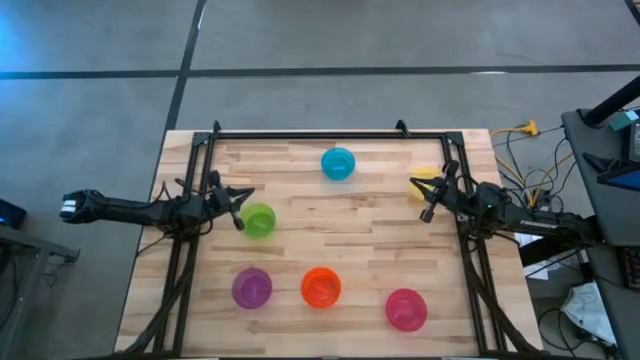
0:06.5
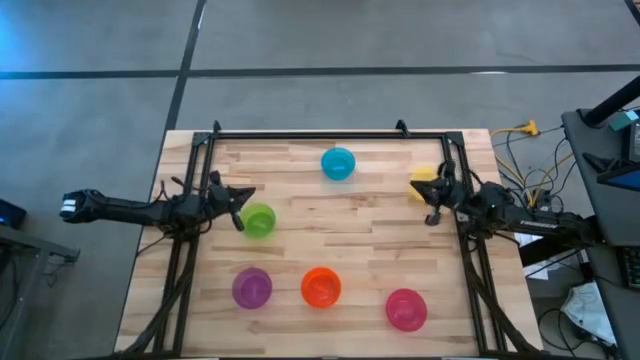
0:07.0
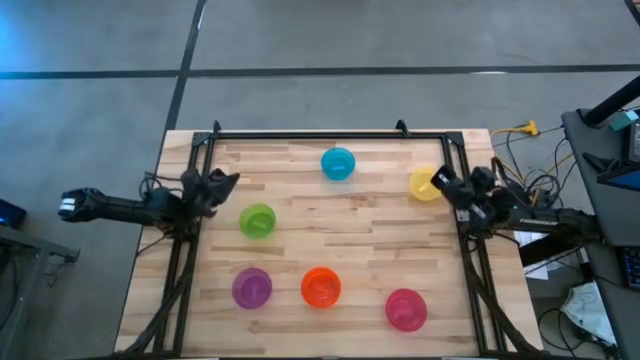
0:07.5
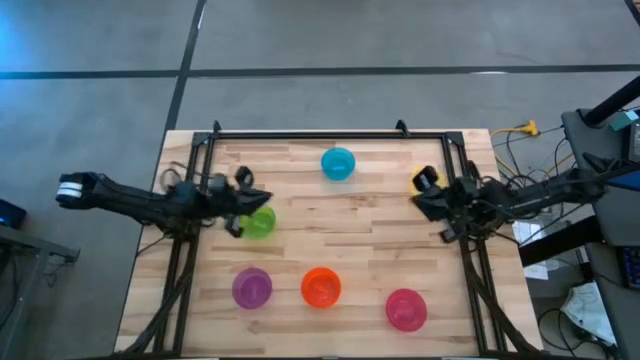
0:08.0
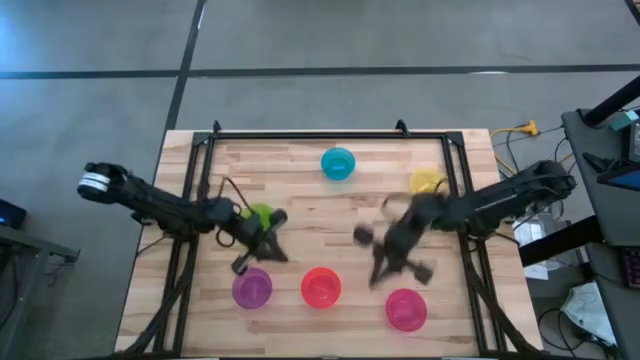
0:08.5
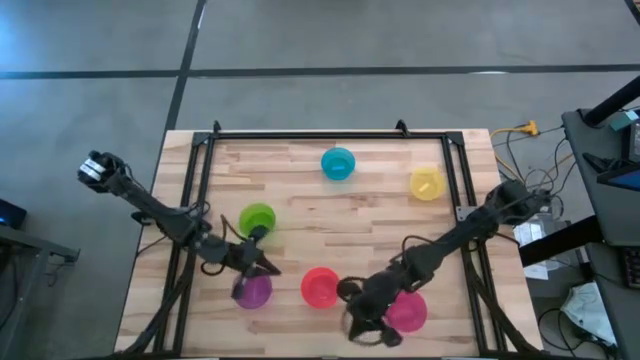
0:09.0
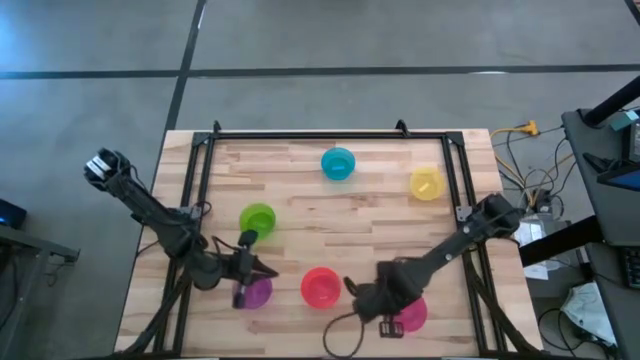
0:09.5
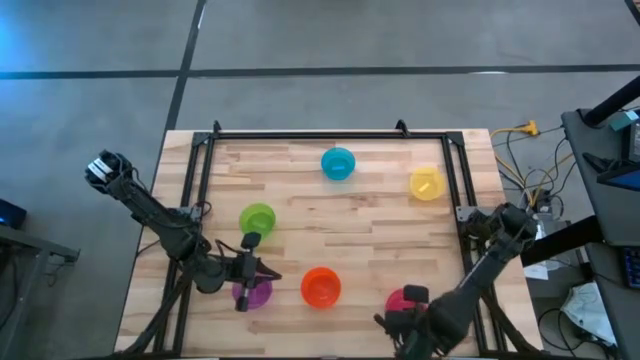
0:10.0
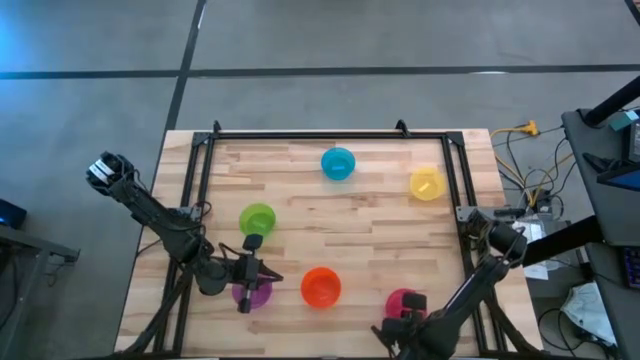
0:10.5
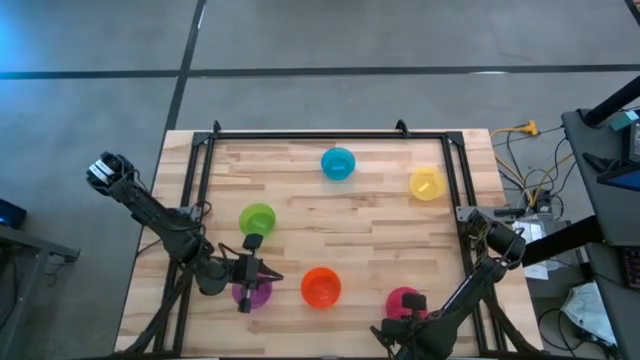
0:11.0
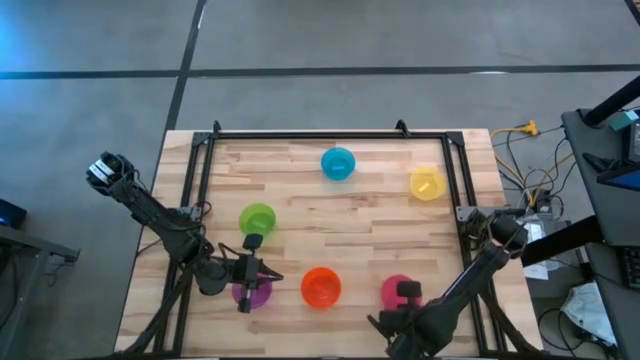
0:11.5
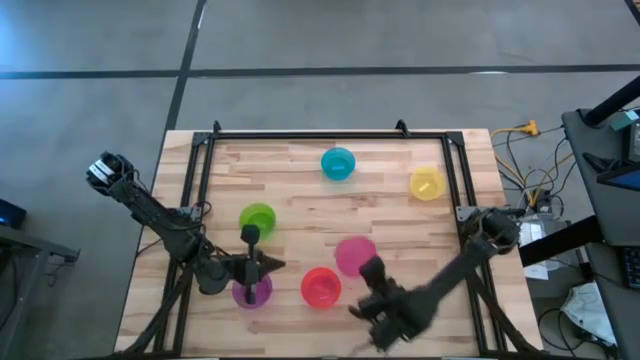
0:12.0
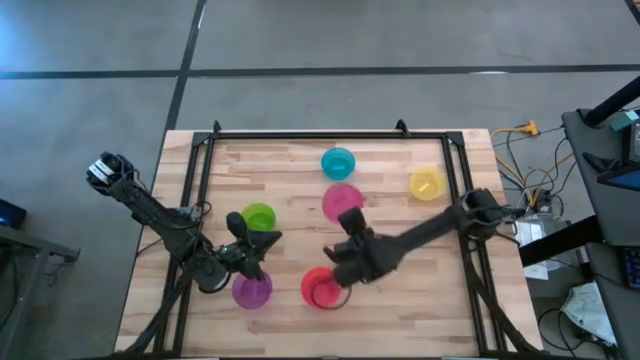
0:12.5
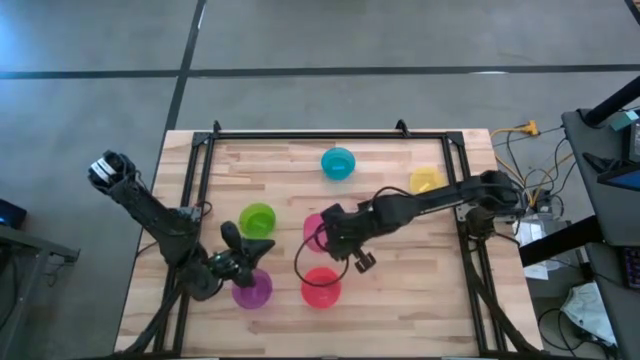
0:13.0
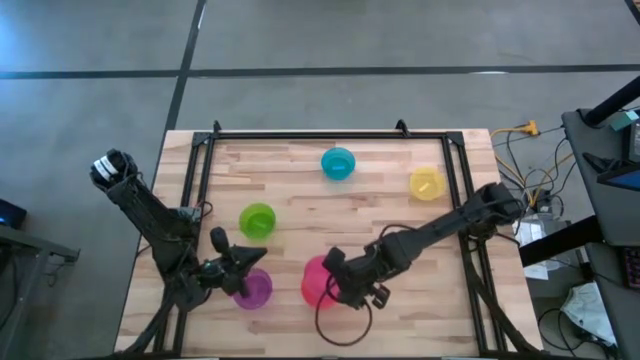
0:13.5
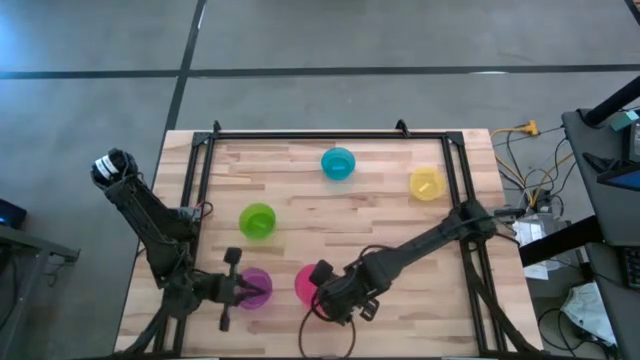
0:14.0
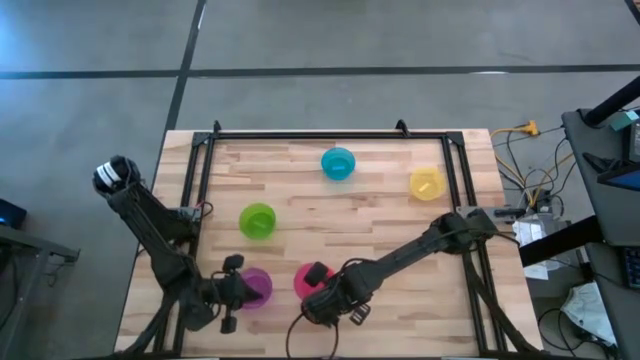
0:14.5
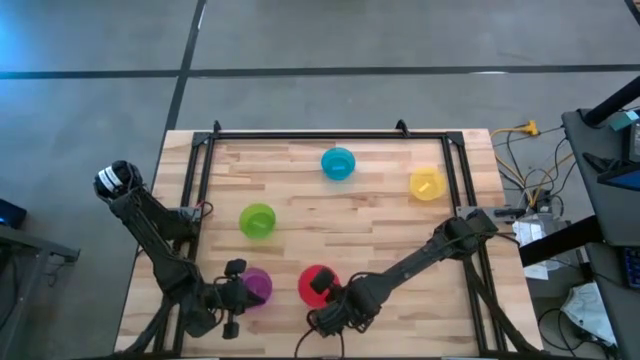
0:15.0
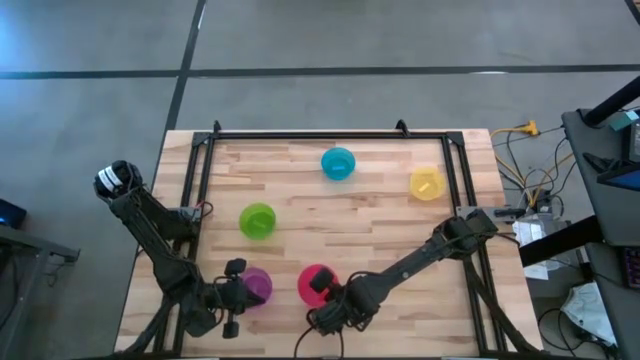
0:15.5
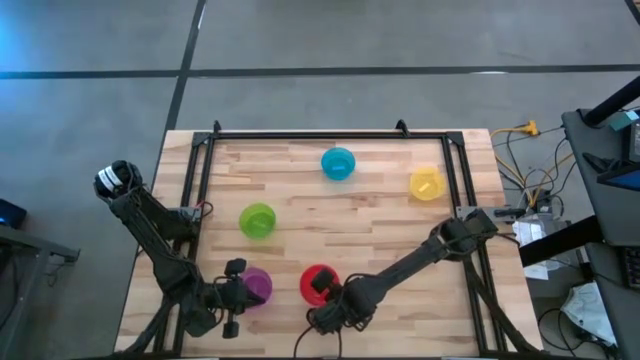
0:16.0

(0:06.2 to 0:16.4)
Task: Nest bowls inside each other
Stack the pink bowl on top of the orange bowl

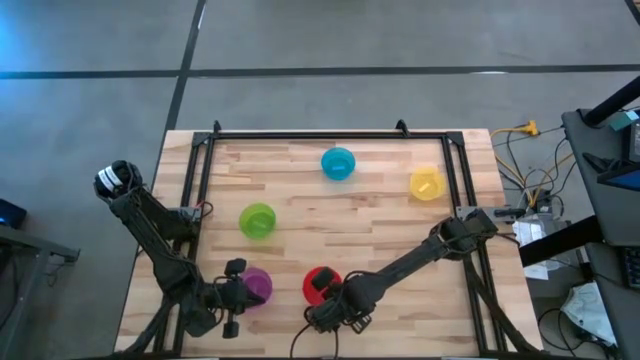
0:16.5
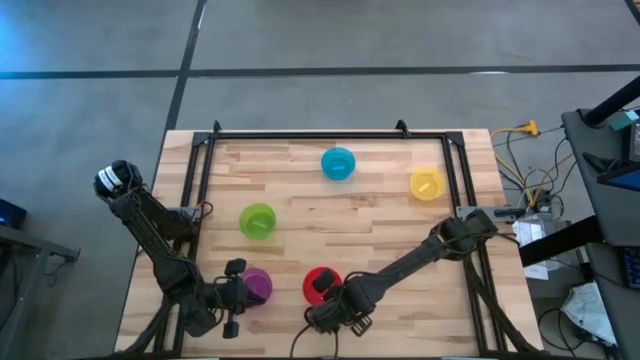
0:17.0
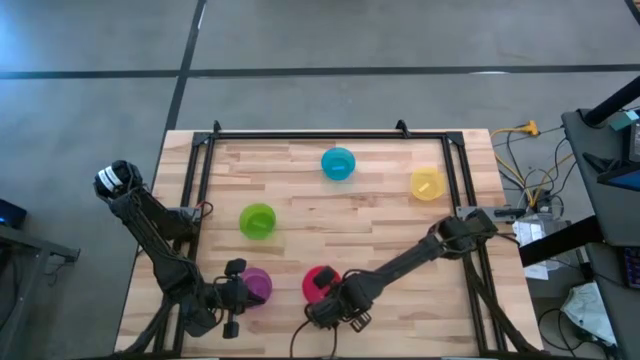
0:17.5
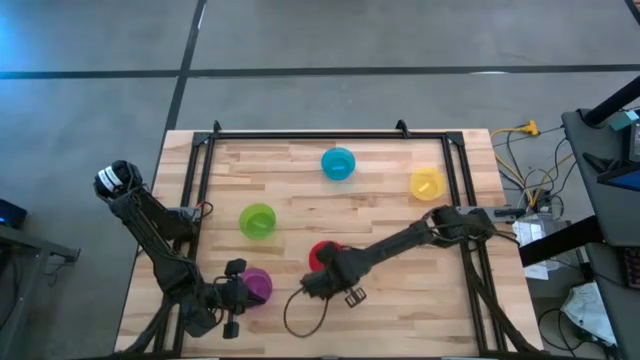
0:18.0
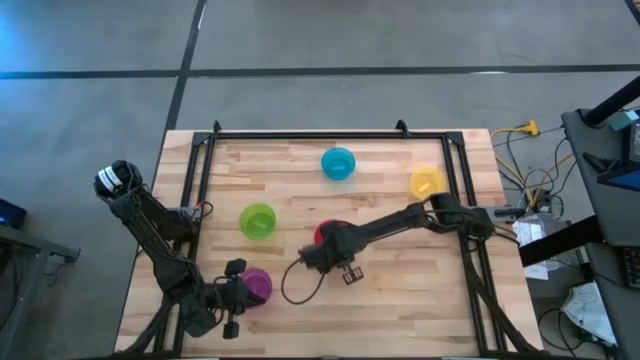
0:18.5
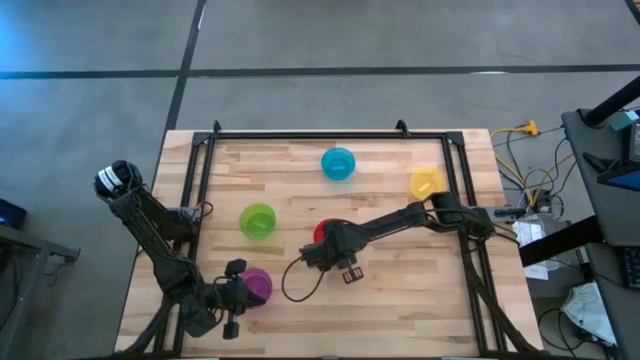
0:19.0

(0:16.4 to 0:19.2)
Move the stacked bowls to the center of the table

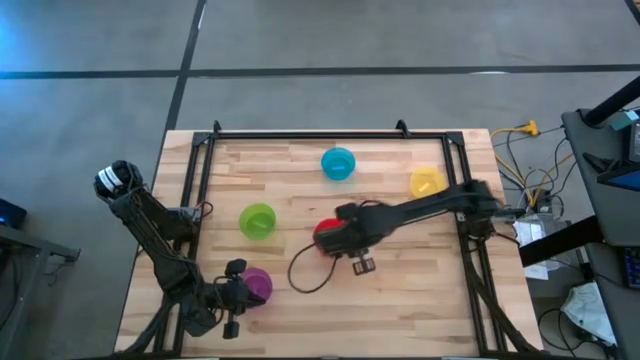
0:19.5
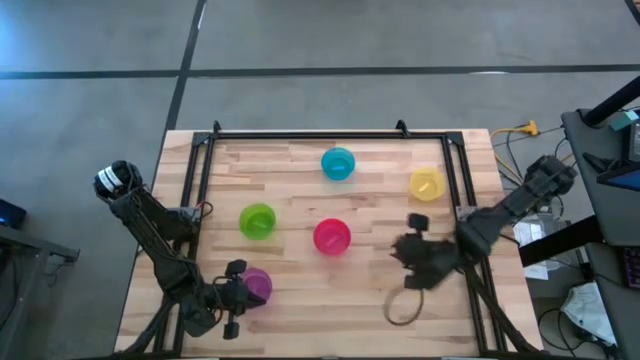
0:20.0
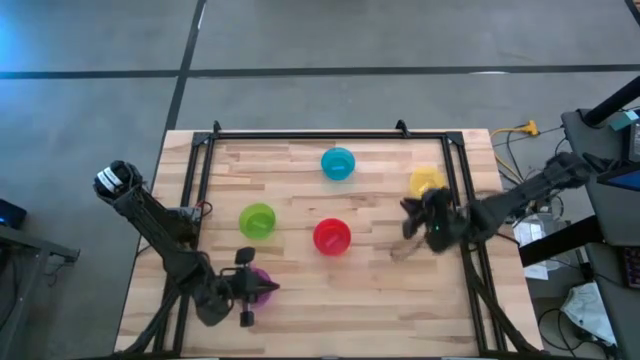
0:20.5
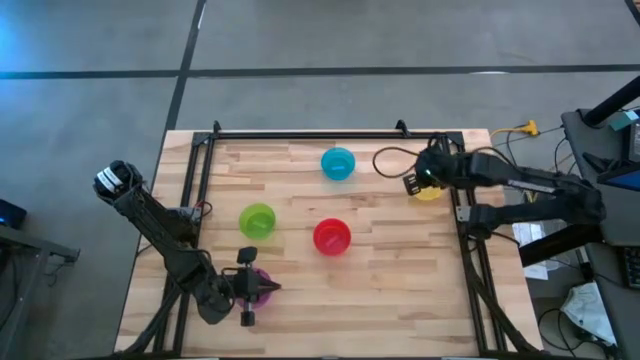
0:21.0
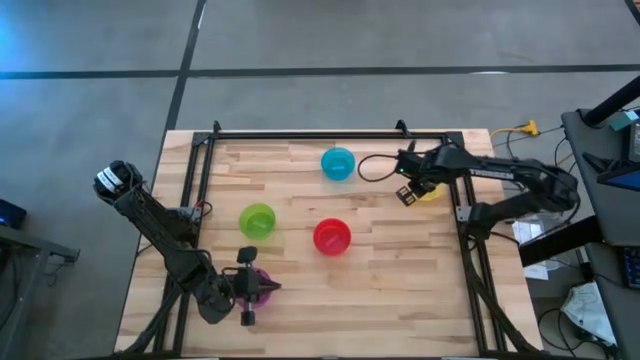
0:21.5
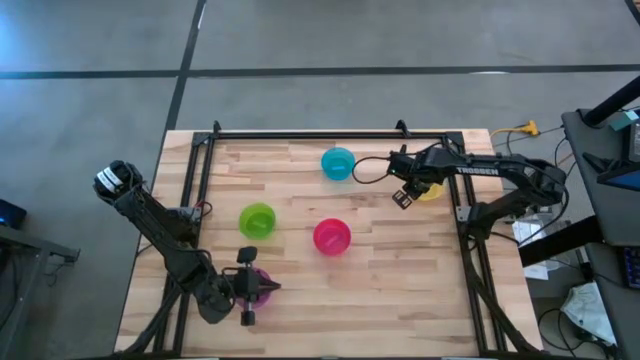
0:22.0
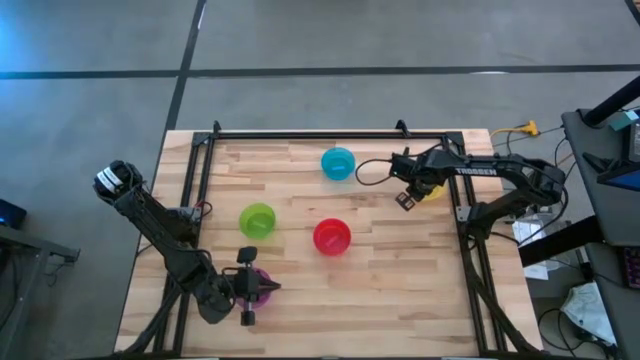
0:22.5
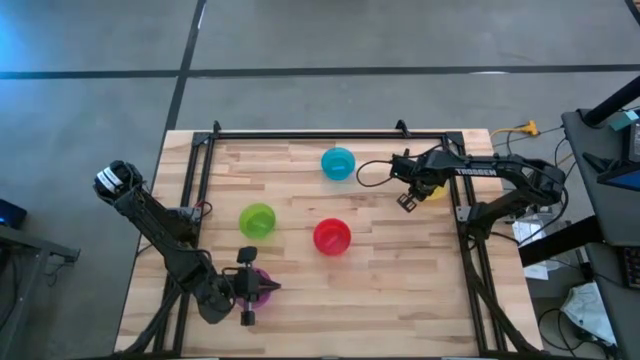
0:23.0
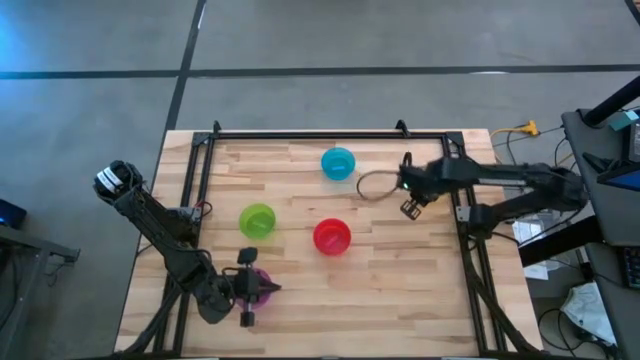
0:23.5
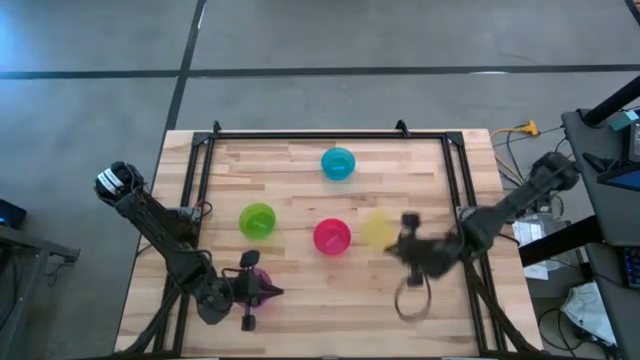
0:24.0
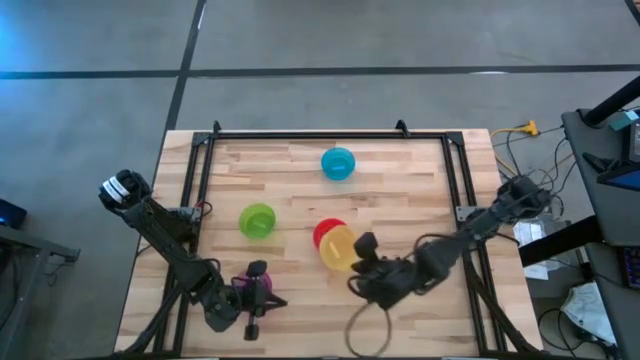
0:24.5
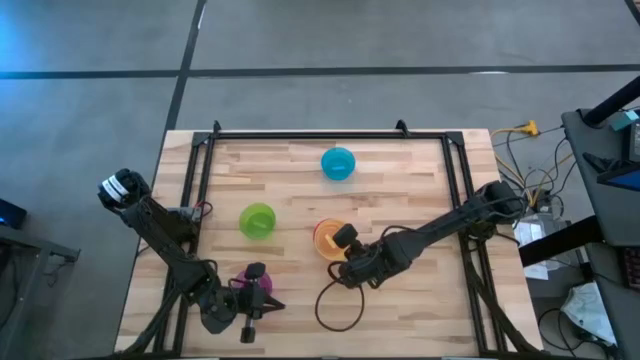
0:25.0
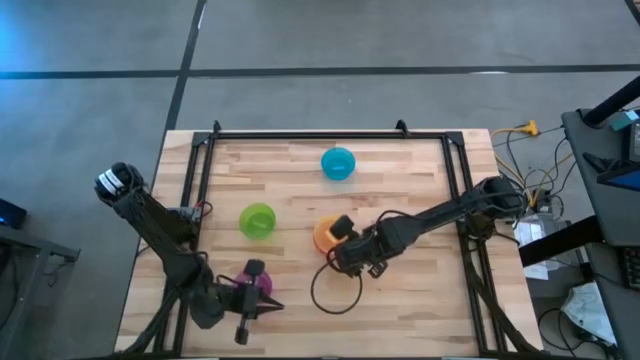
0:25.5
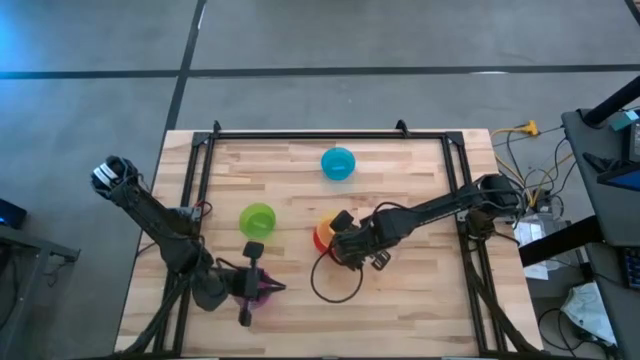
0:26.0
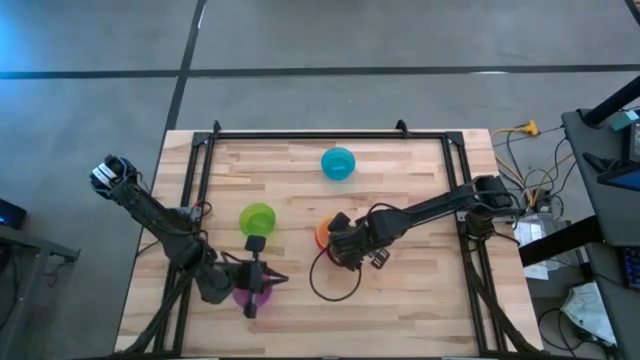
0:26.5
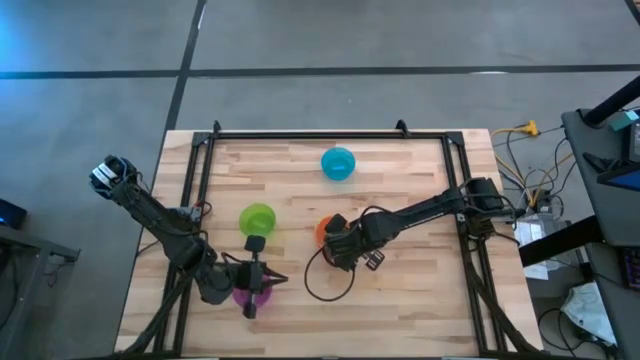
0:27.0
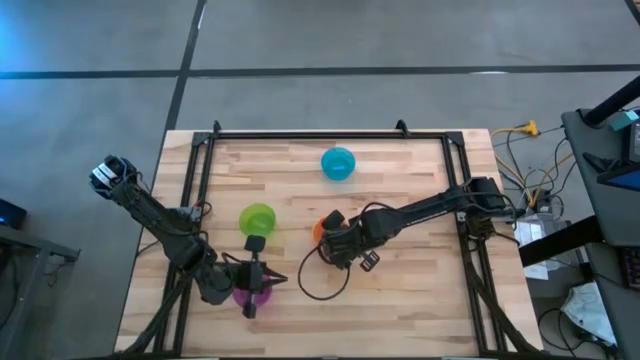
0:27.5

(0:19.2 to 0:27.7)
Stack the yellow bowl on top of the pink bowl
